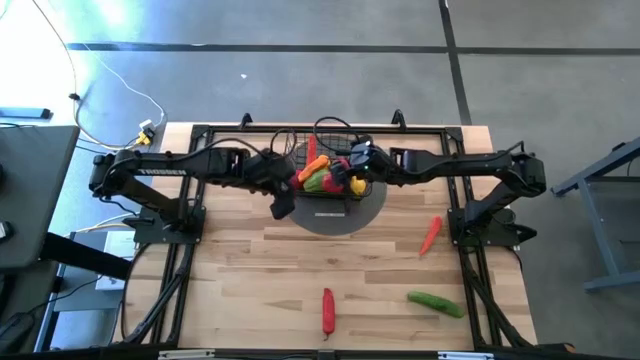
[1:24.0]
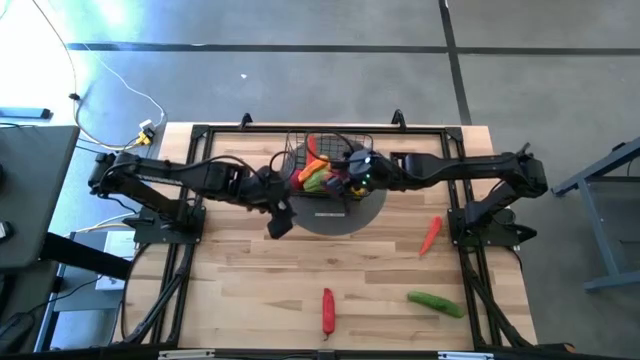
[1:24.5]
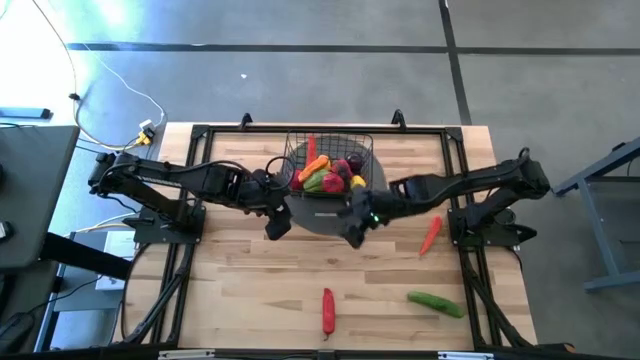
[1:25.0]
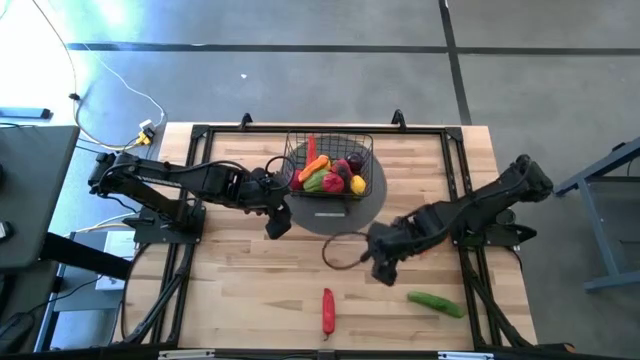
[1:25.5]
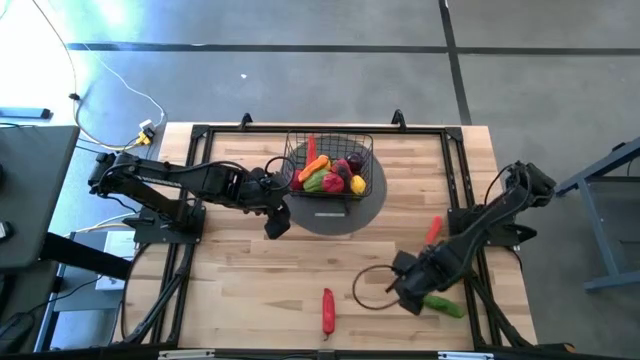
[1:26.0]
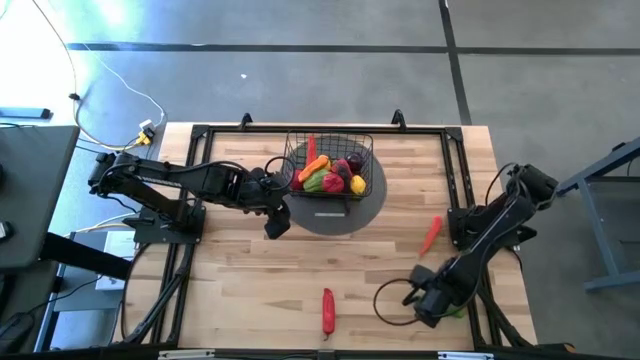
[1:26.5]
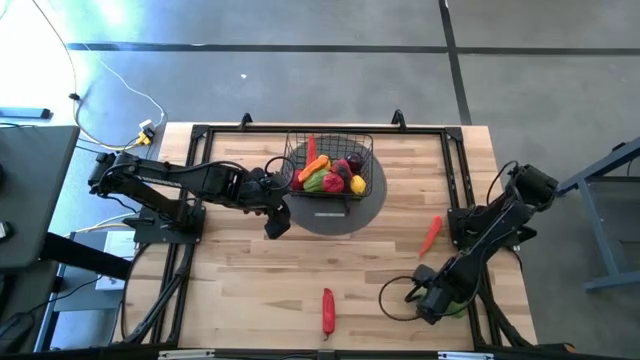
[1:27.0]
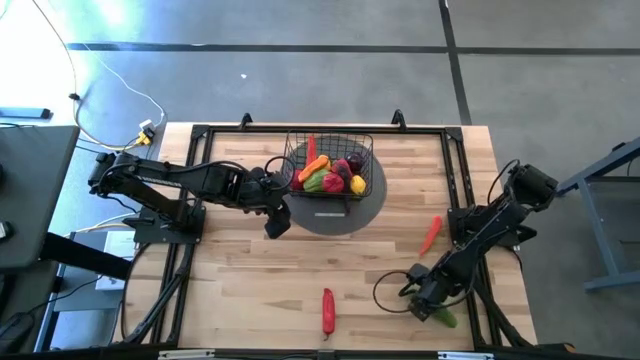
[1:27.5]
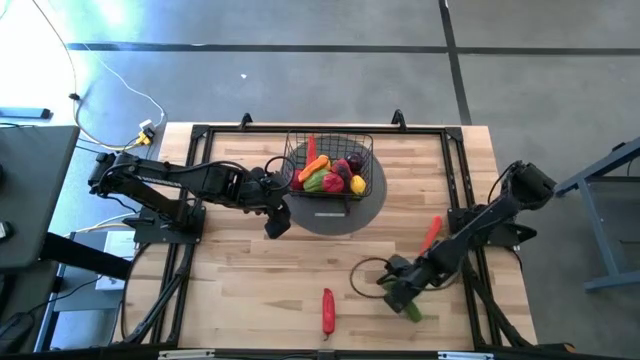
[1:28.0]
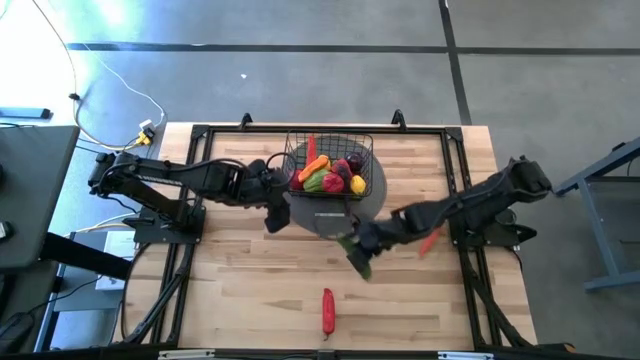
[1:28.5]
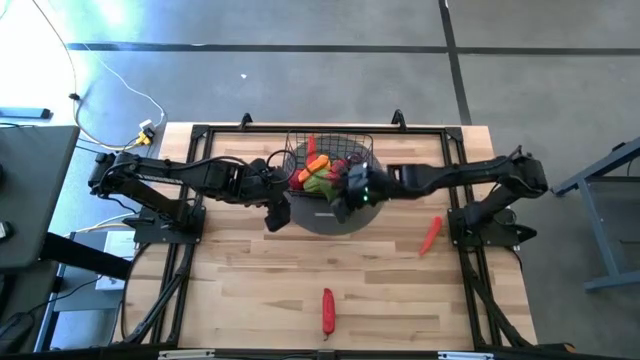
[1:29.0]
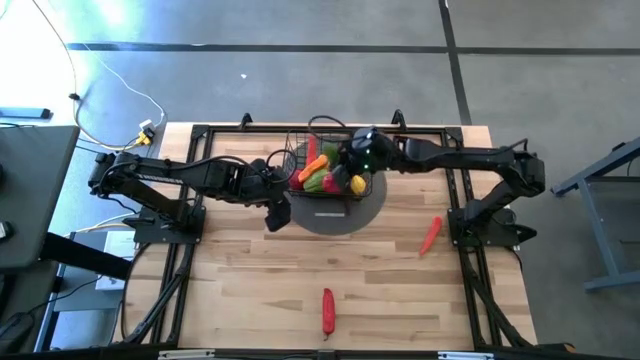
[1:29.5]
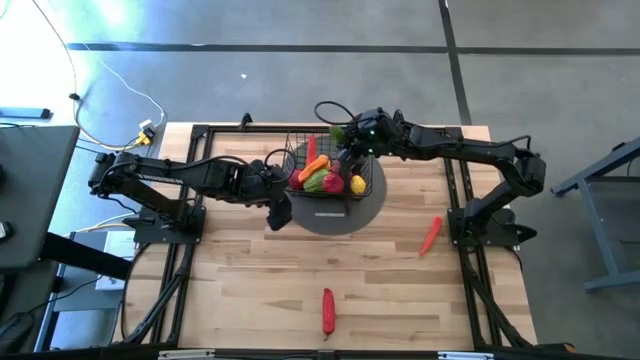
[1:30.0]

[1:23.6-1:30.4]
Task: Build produce basket
Put the cucumber into the wire basket

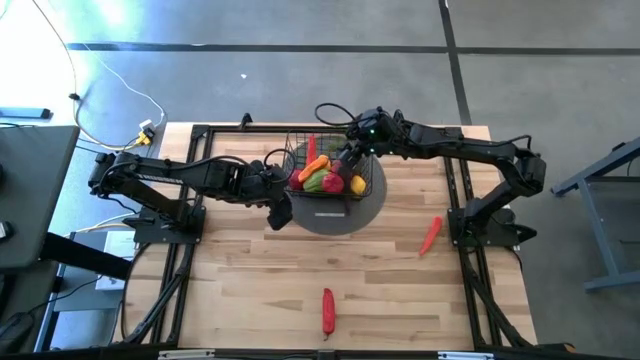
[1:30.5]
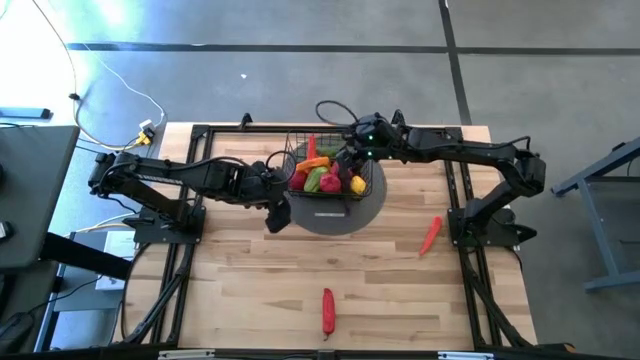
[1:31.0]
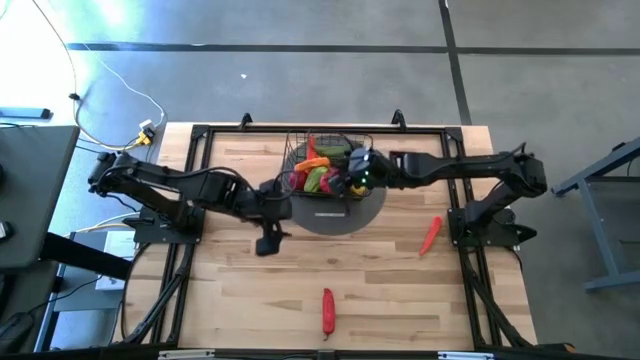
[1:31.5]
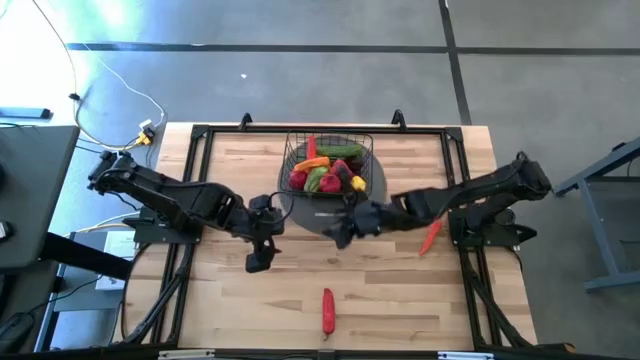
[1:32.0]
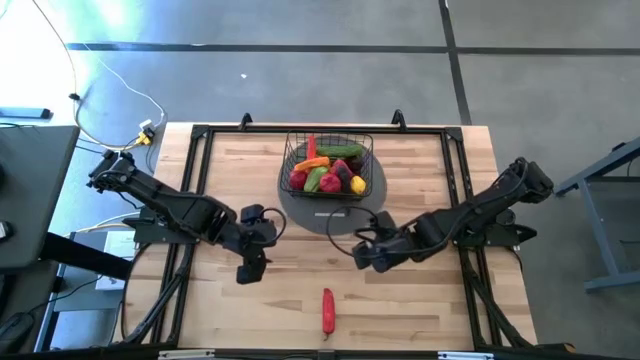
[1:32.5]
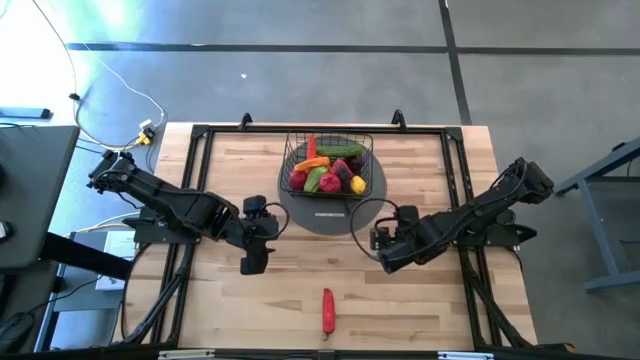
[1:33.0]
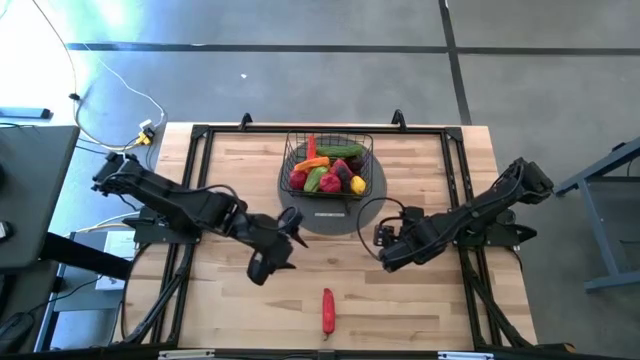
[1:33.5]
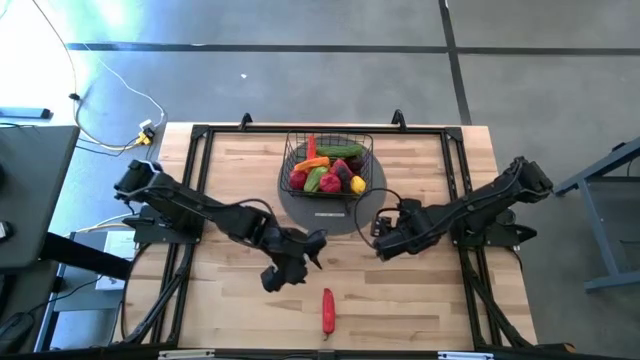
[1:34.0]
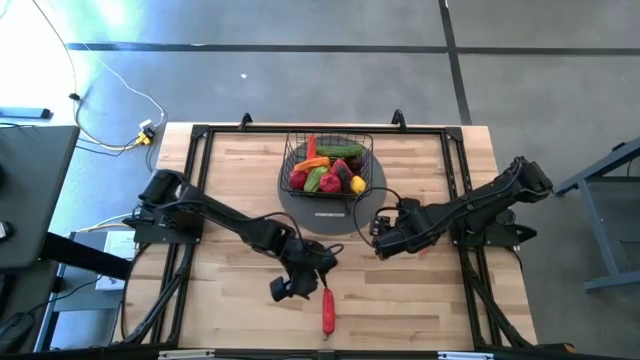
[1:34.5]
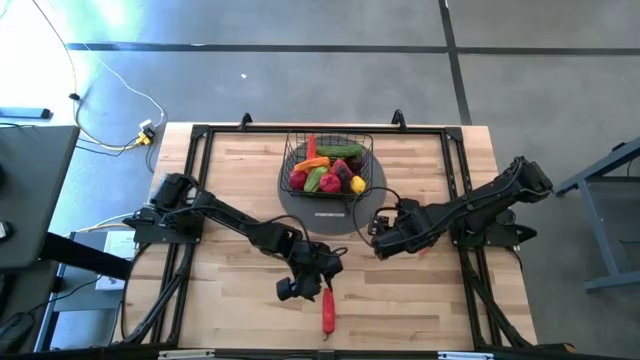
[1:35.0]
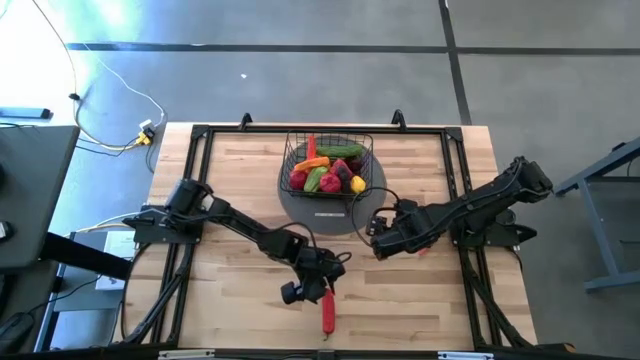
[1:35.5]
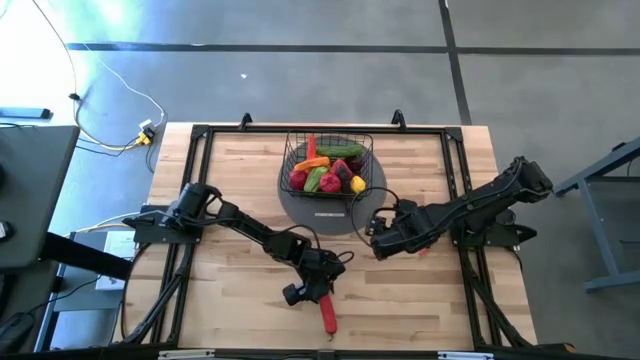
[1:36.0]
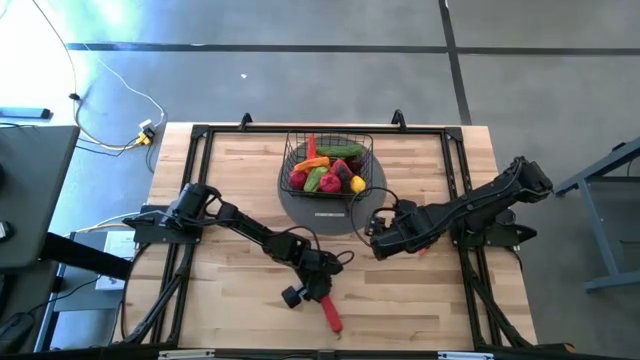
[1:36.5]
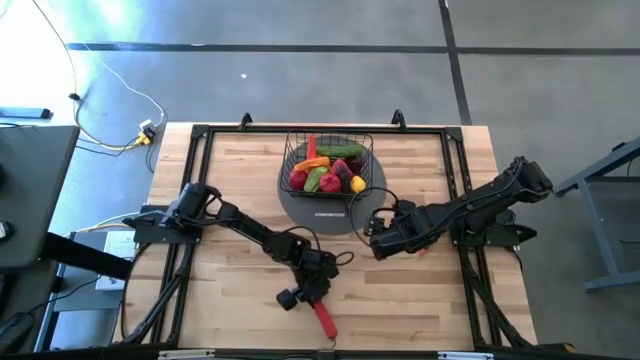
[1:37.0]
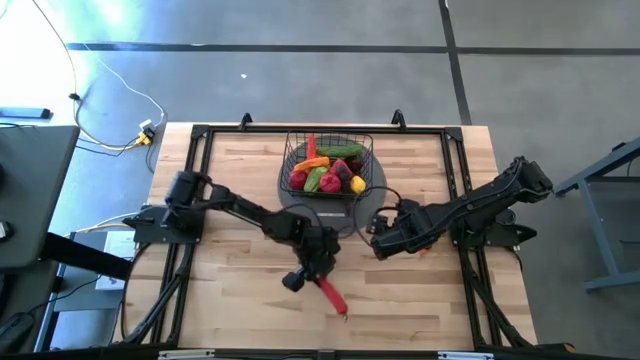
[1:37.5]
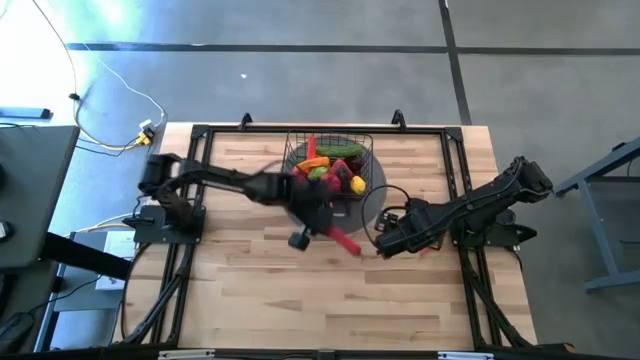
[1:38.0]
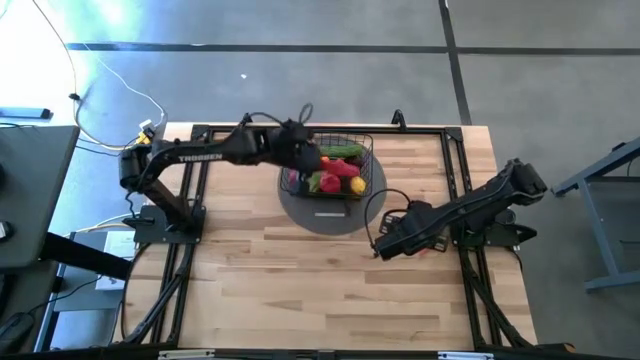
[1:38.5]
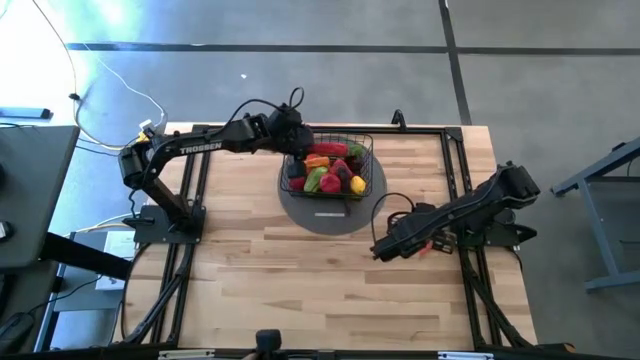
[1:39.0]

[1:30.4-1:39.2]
Put the red pepper into the wire basket

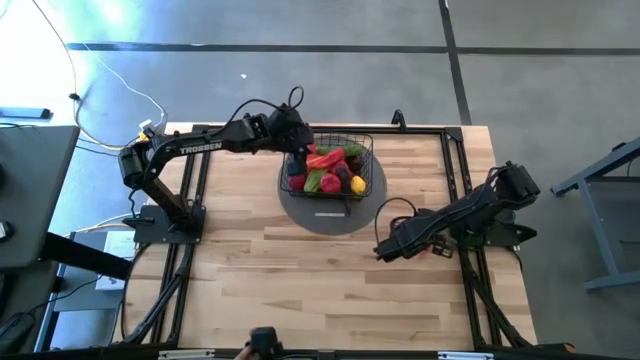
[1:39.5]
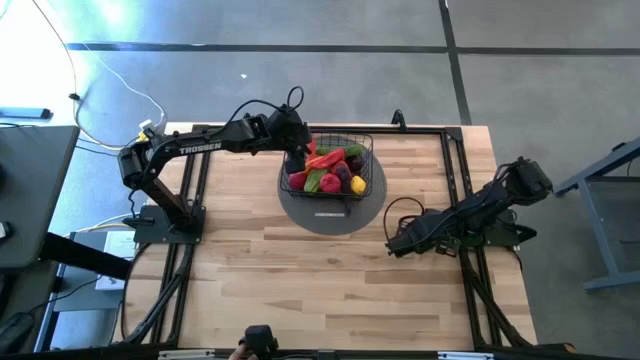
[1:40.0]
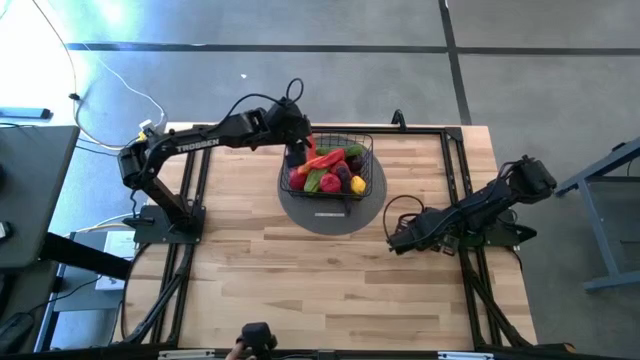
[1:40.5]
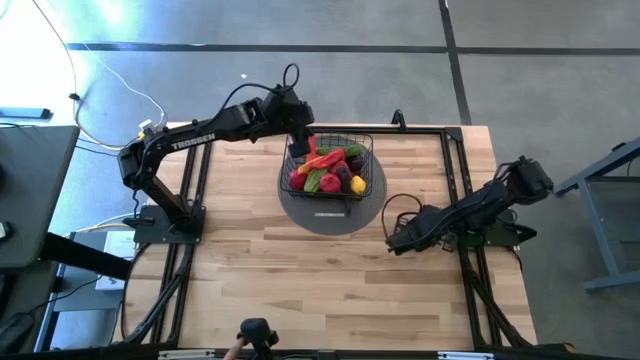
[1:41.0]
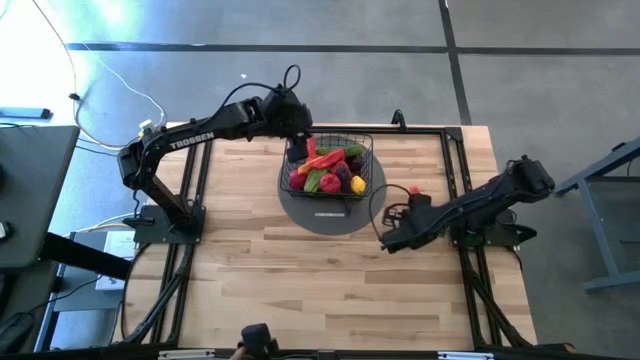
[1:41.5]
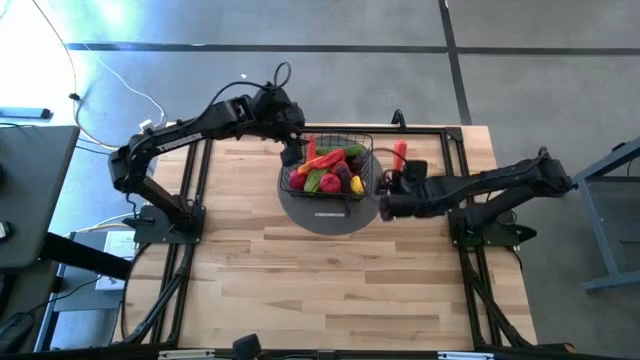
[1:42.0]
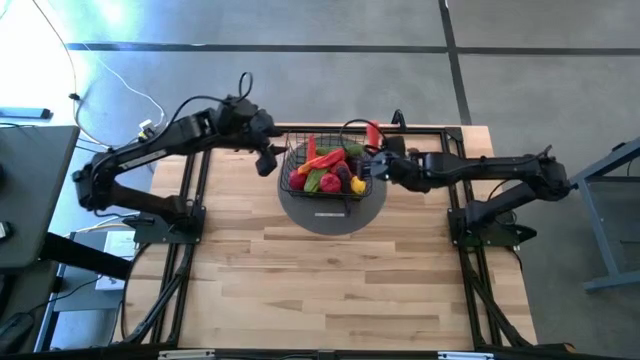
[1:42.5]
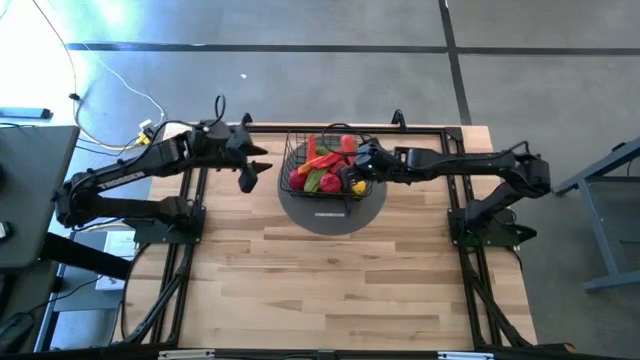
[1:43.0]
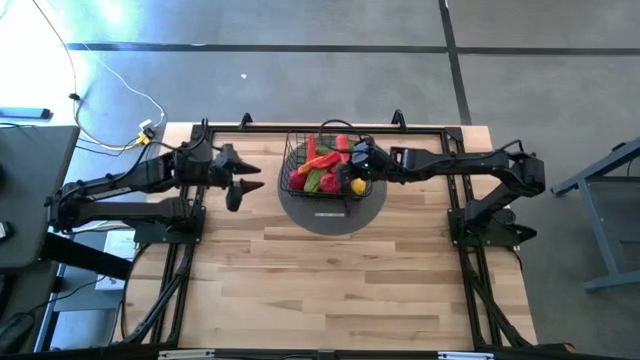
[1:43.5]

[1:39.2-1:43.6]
Put the bottom carrot into the wire basket

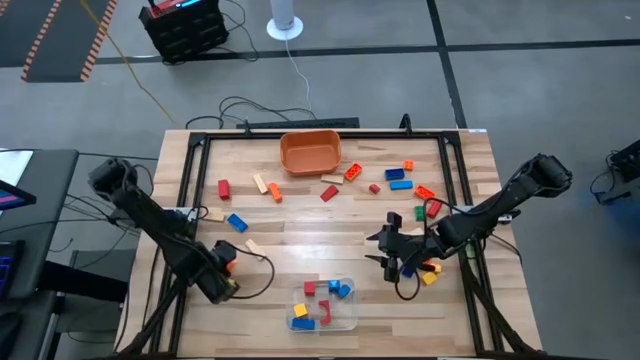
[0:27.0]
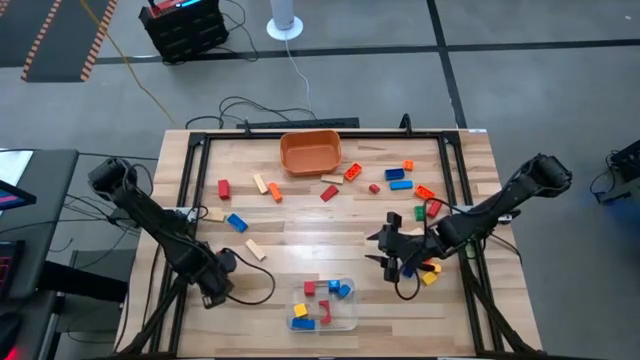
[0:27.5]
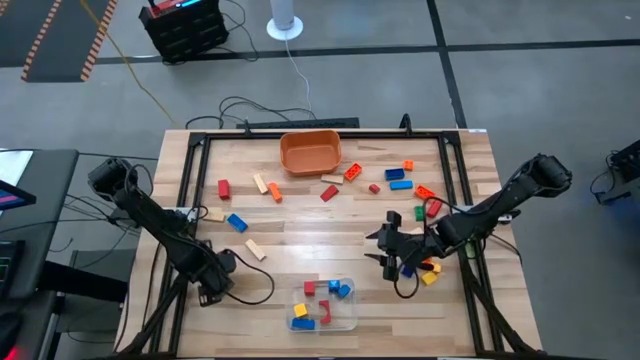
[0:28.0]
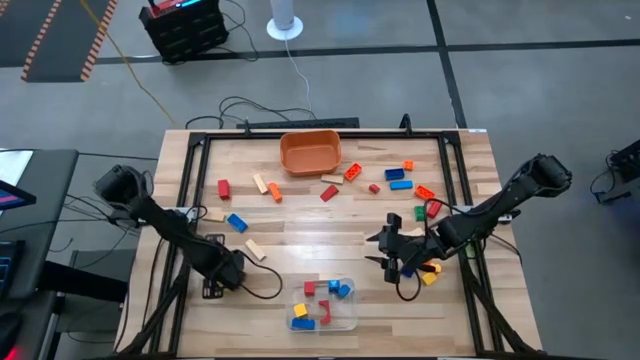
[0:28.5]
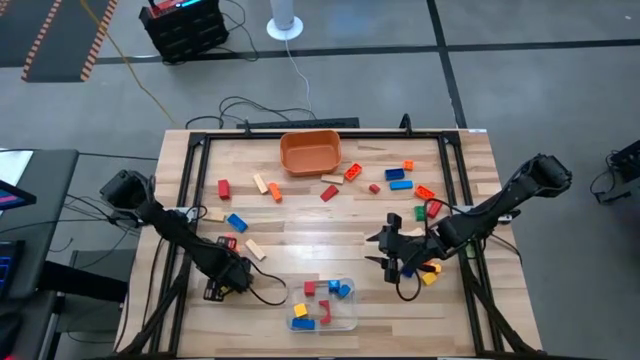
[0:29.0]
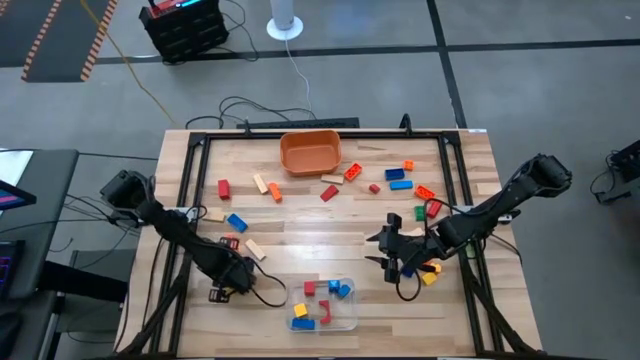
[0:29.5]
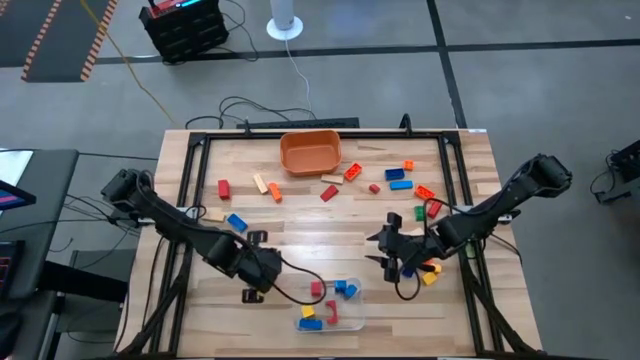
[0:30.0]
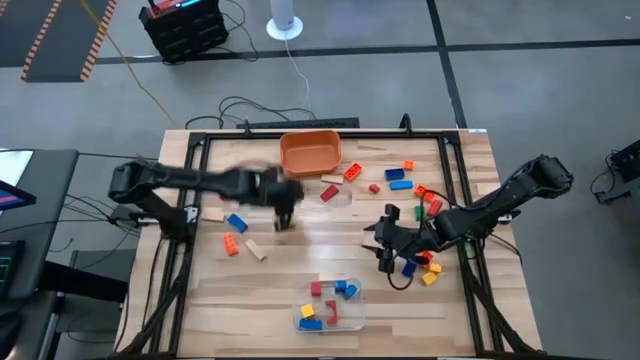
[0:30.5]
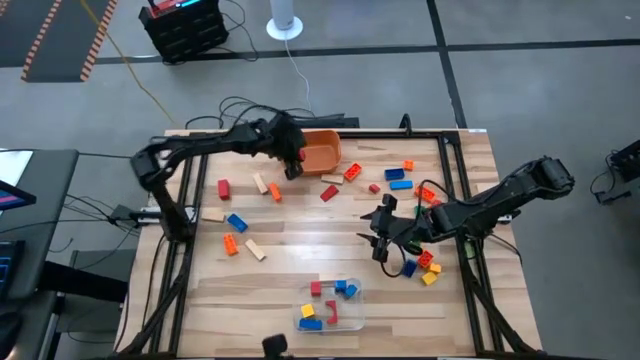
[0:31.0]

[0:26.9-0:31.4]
Task: Sort blocks by size
Put the small red wooden block into the orange bin
